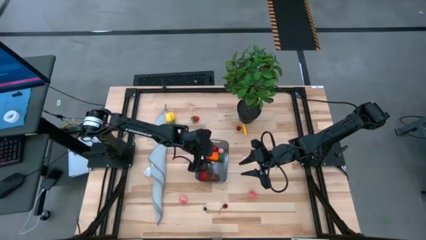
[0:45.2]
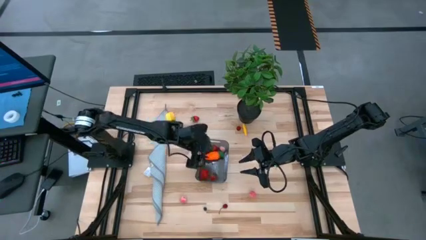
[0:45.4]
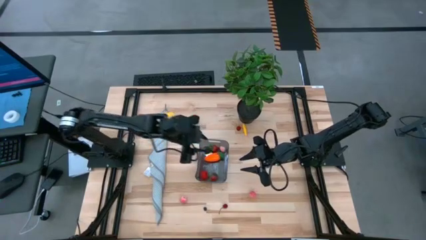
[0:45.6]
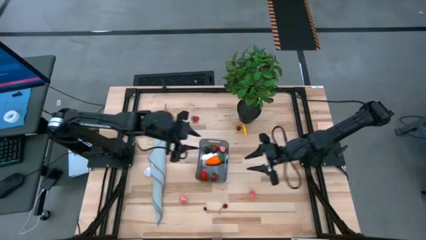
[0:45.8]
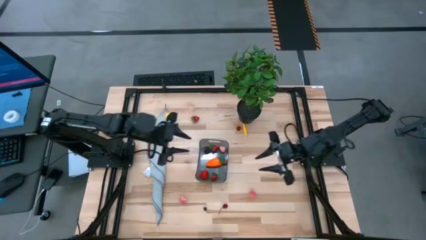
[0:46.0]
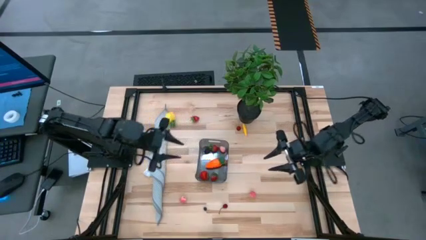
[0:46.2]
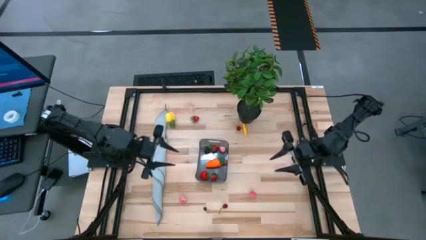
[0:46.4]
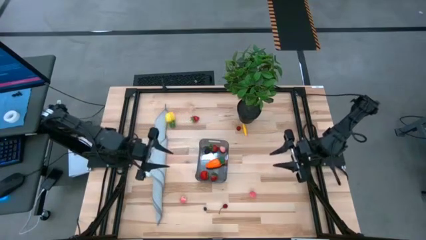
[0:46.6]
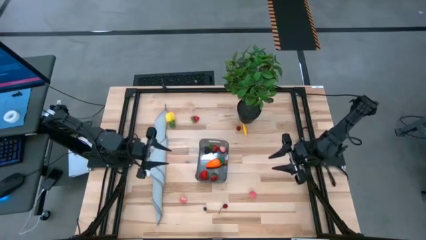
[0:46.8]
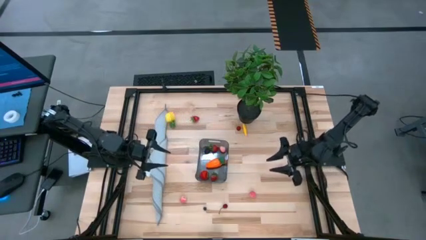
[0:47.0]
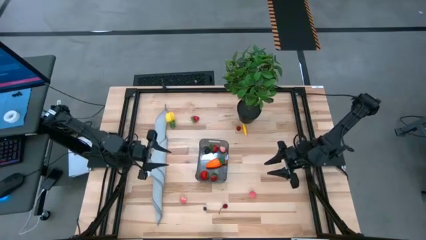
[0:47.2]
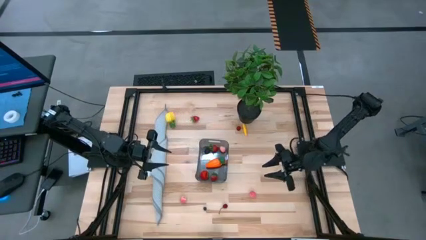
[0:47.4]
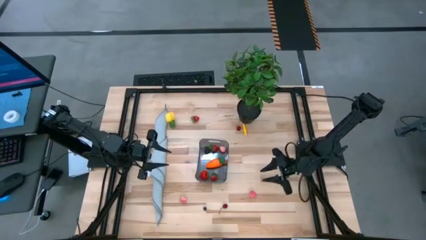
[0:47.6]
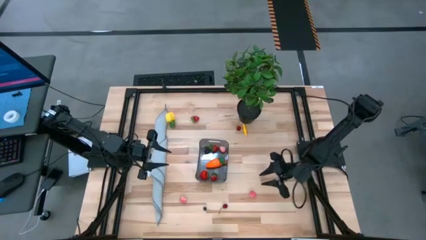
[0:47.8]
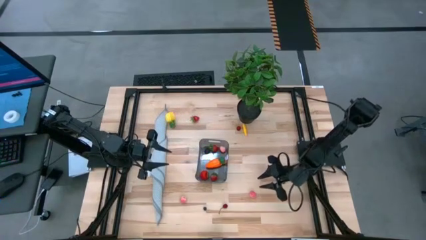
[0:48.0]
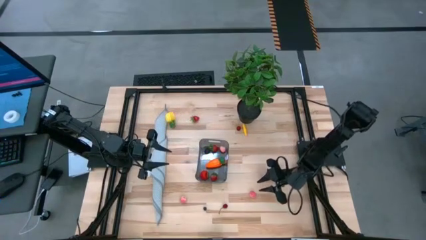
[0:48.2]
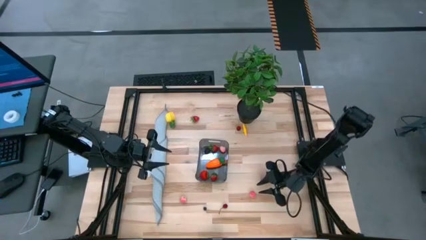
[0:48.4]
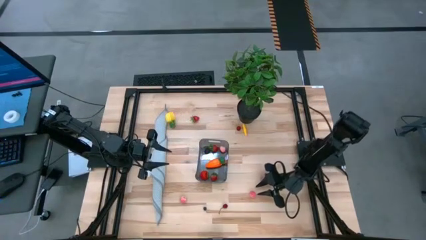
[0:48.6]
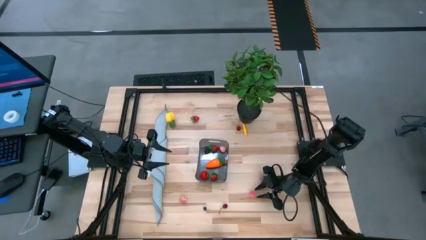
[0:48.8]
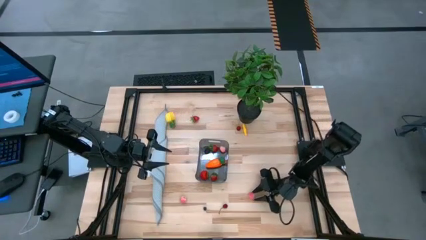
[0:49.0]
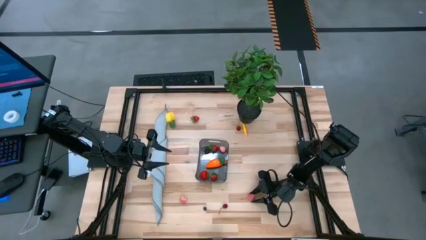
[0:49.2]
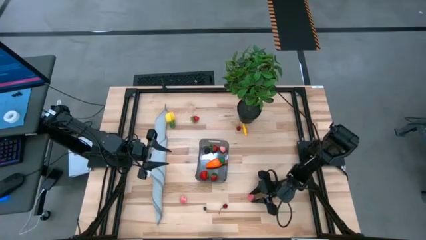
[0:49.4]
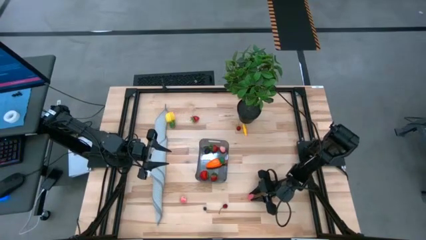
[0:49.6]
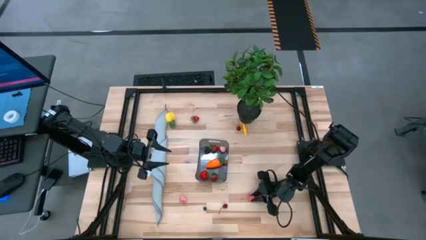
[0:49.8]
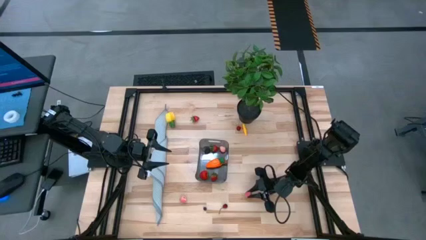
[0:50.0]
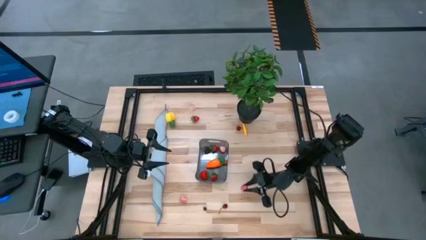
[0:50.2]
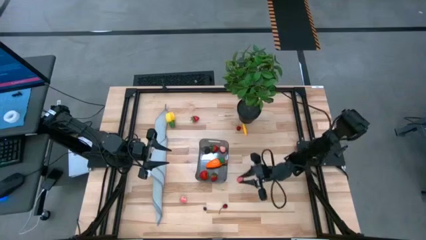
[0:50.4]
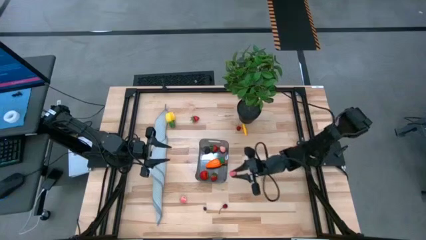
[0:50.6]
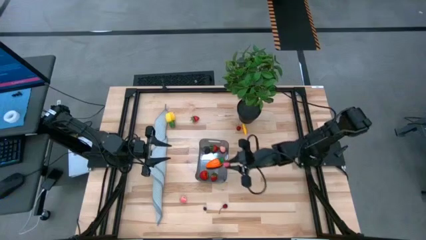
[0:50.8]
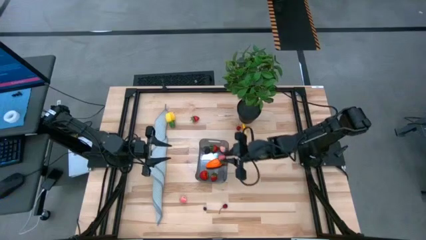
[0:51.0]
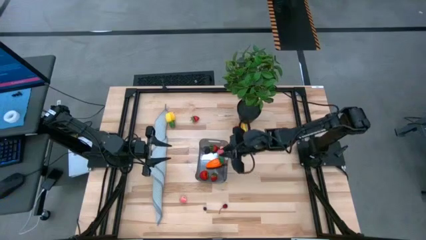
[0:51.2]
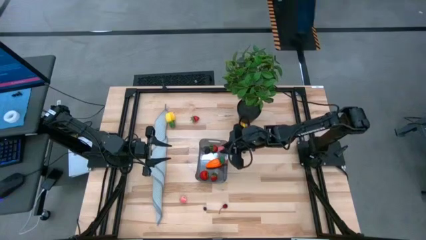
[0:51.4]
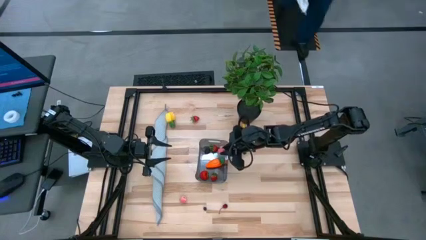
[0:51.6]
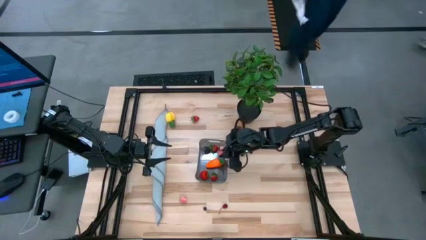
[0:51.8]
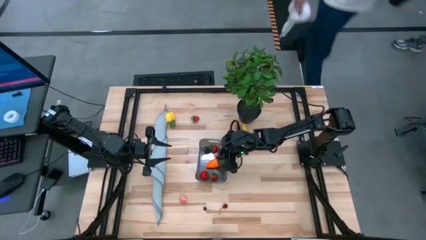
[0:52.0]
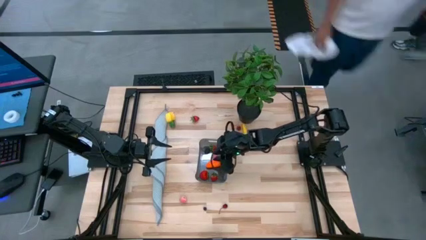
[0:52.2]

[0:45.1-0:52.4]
Task: Pick and placing Produce into tupperware
Put the right peach into the bin

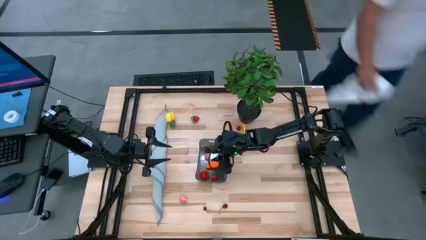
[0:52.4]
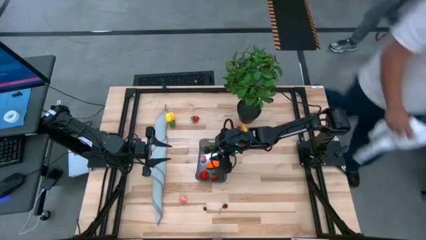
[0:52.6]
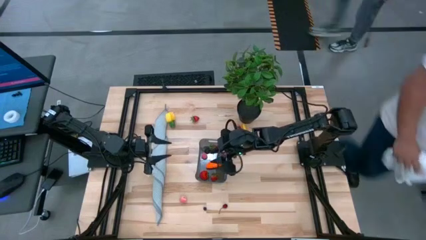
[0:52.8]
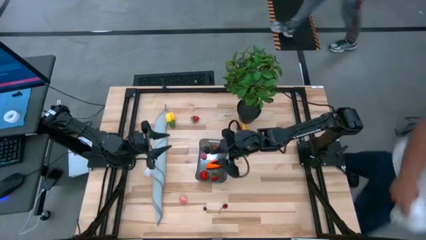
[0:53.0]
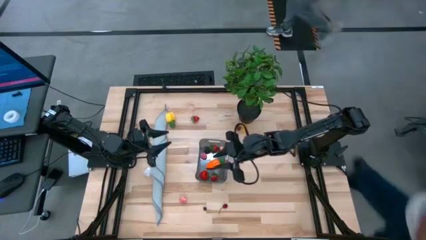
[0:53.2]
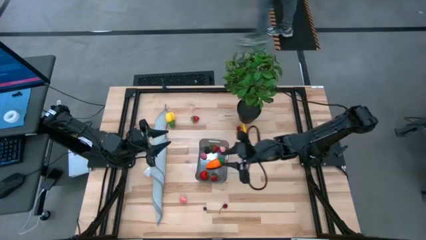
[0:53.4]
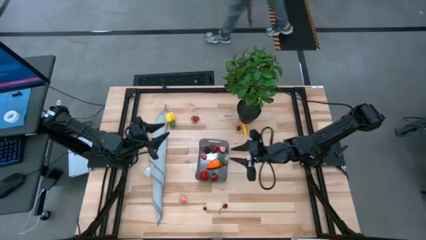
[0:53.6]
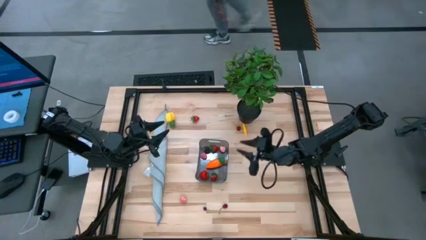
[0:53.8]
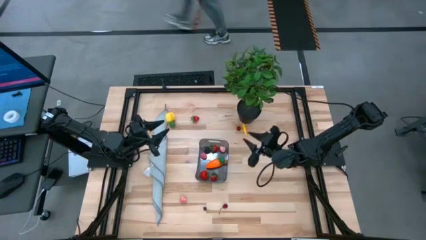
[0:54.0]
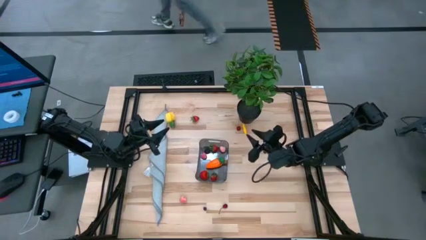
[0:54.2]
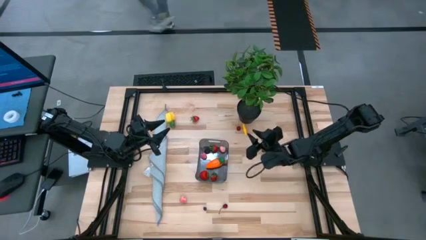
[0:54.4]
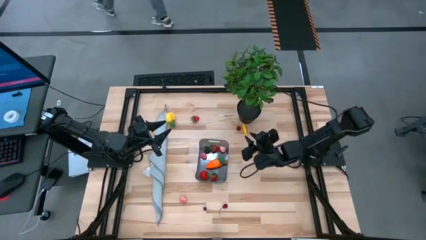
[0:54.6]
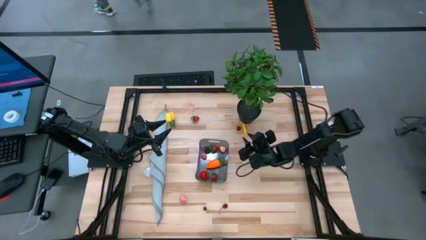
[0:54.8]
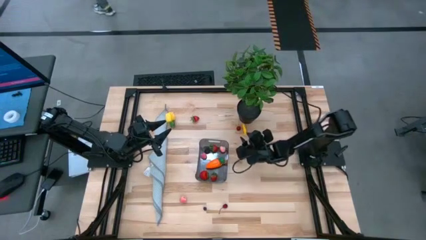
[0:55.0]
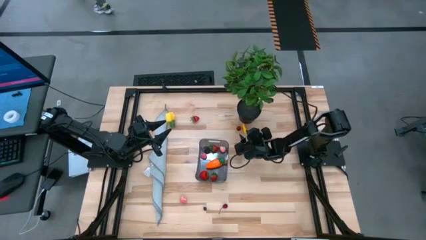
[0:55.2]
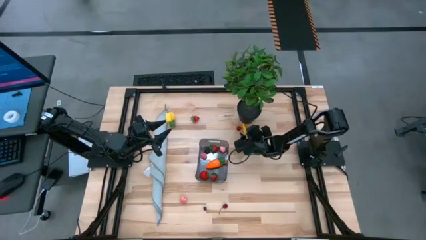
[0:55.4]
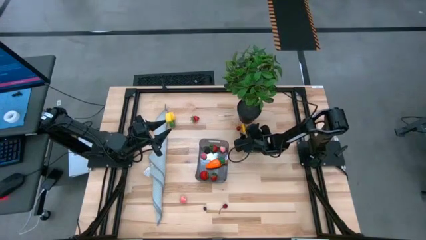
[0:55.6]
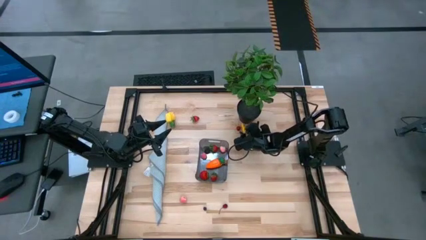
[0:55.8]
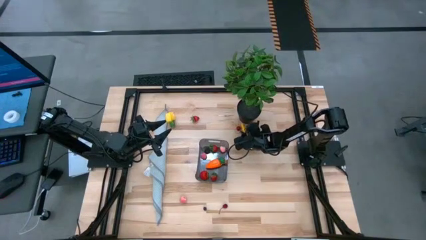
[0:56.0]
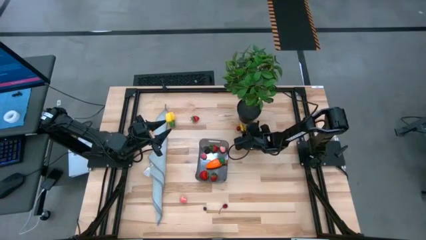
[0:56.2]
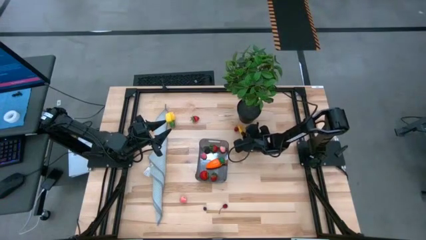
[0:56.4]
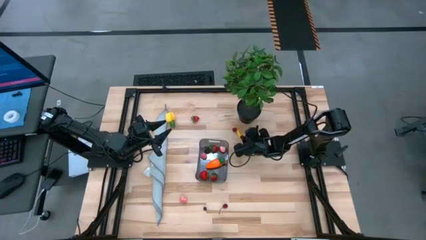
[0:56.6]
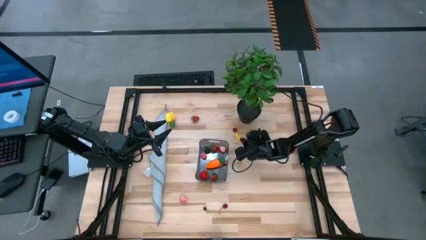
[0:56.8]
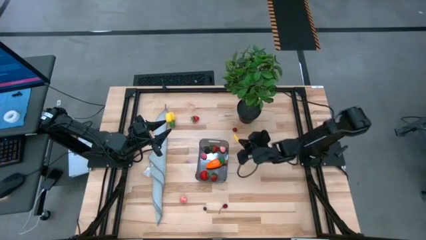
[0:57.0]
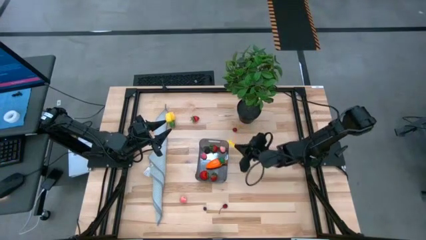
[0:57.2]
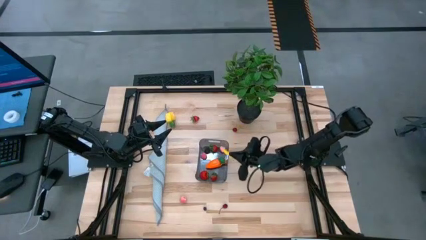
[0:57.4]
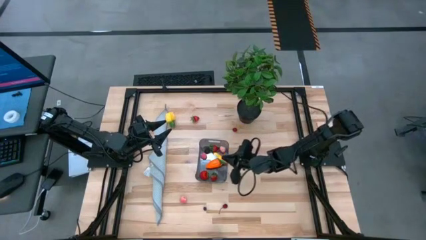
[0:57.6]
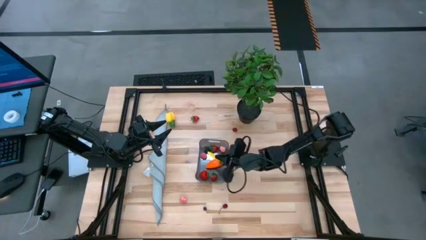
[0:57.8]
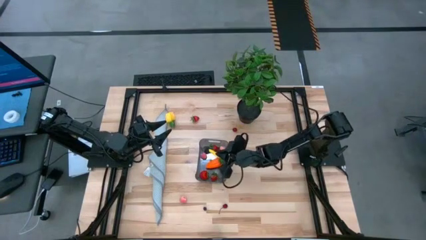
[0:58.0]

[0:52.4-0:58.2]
Put the corn into the bin

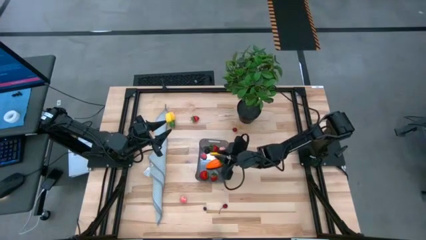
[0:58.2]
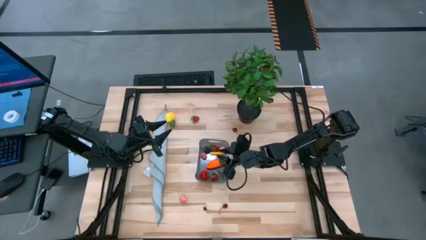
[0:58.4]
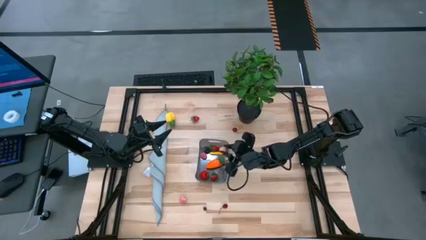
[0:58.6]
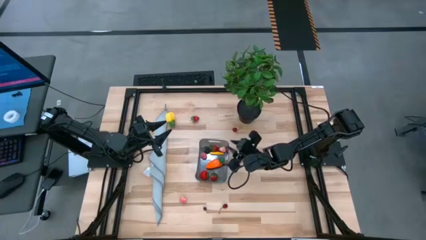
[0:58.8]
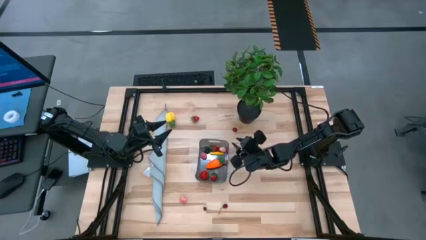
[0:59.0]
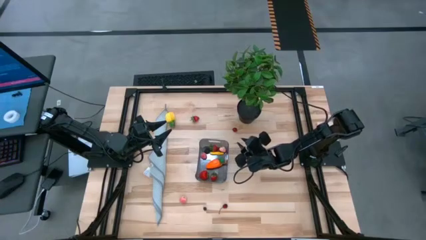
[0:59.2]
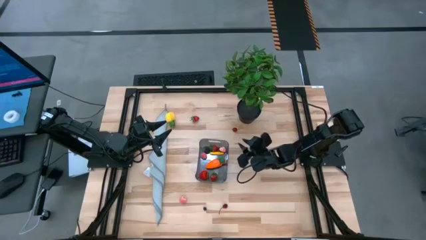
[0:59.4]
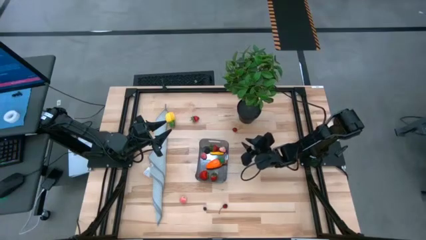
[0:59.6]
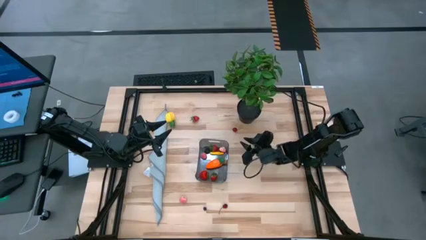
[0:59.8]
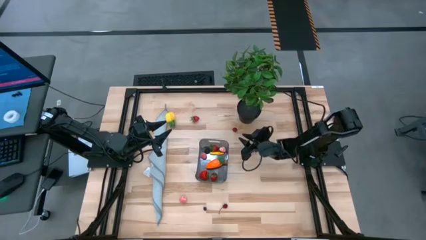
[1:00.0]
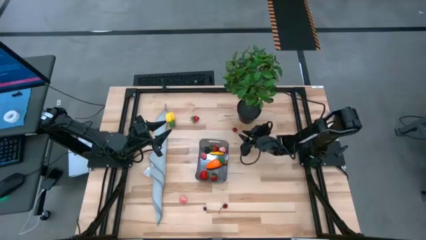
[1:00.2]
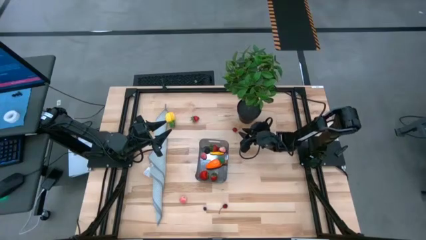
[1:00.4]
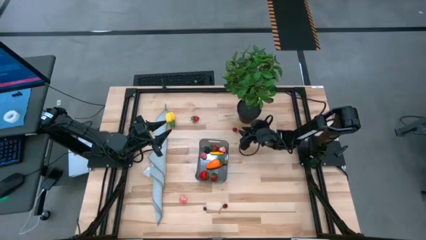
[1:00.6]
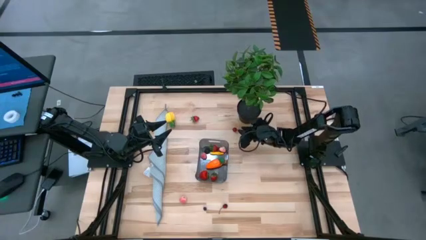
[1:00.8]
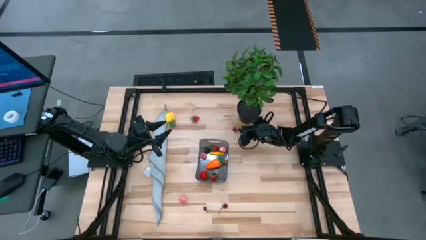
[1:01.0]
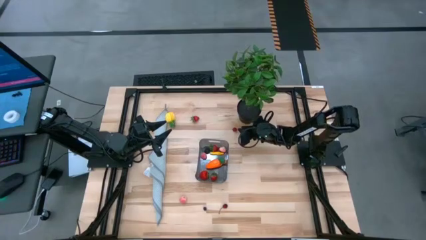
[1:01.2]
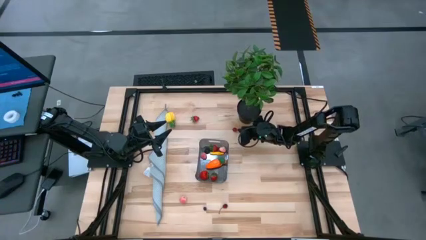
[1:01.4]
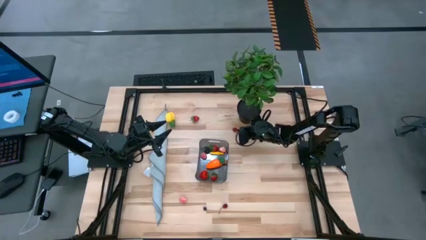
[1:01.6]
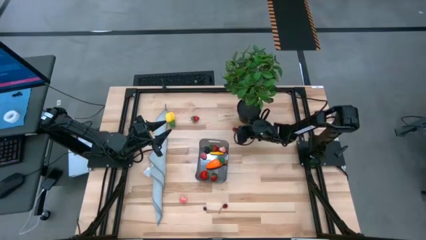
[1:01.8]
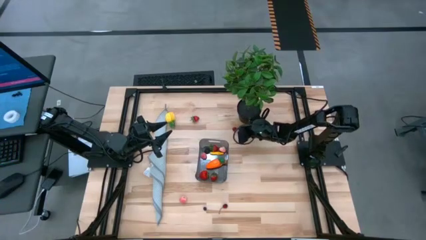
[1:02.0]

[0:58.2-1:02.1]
Put the top cherry into the bin
